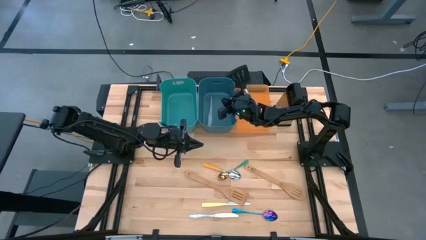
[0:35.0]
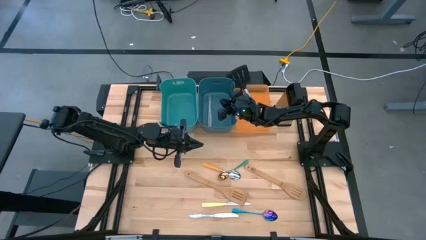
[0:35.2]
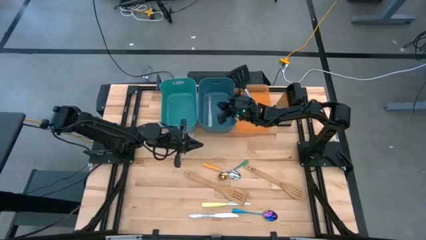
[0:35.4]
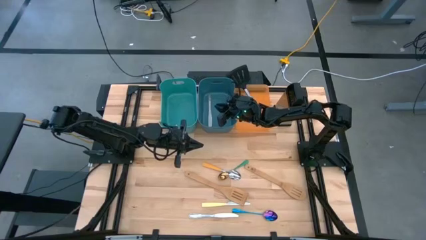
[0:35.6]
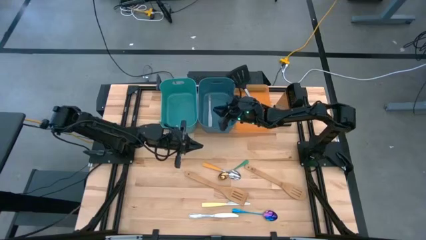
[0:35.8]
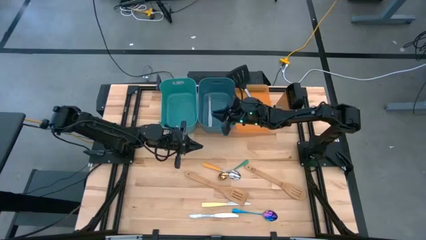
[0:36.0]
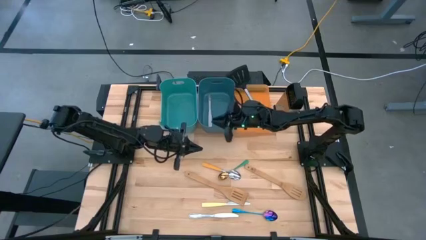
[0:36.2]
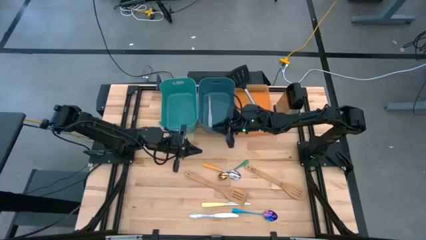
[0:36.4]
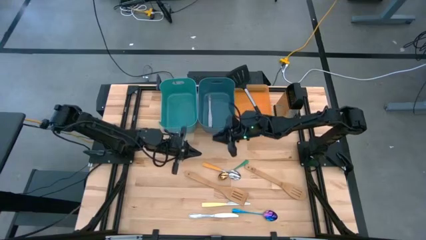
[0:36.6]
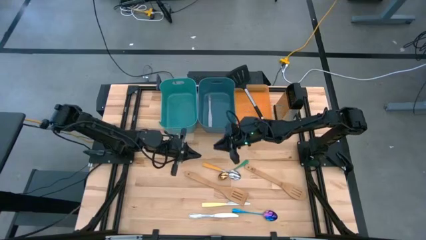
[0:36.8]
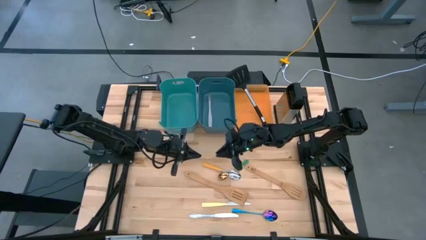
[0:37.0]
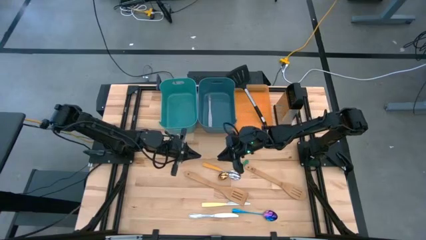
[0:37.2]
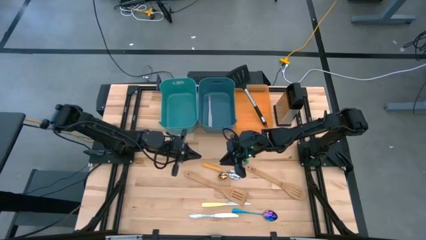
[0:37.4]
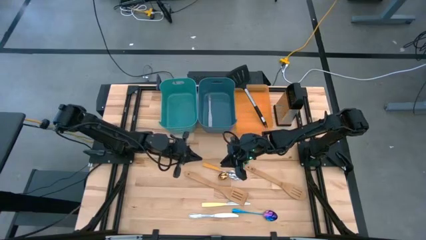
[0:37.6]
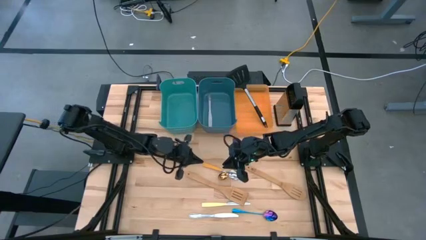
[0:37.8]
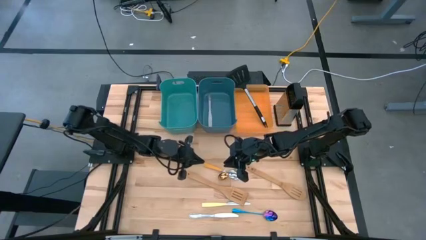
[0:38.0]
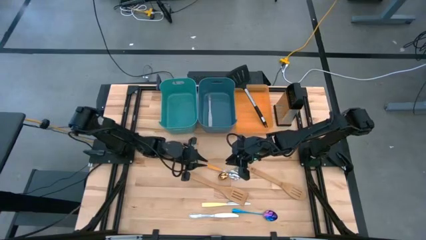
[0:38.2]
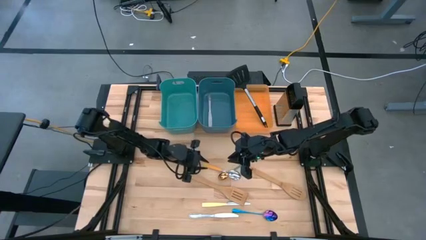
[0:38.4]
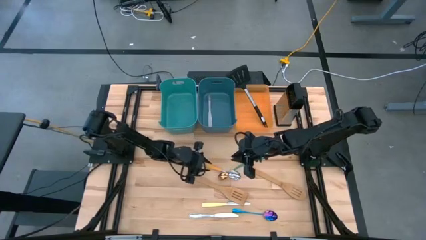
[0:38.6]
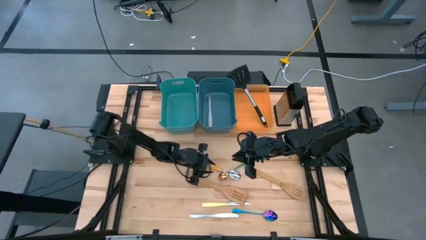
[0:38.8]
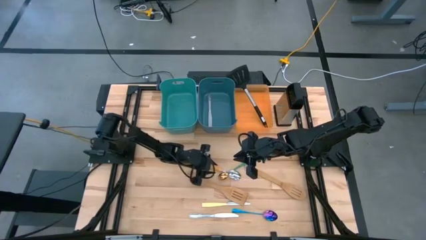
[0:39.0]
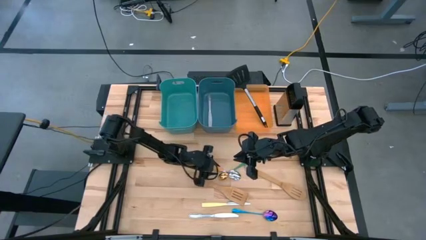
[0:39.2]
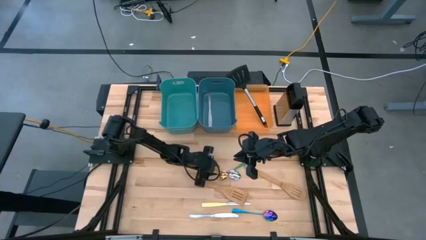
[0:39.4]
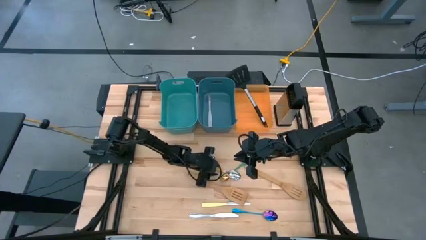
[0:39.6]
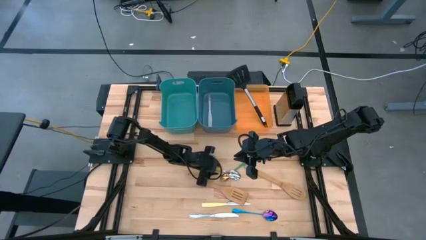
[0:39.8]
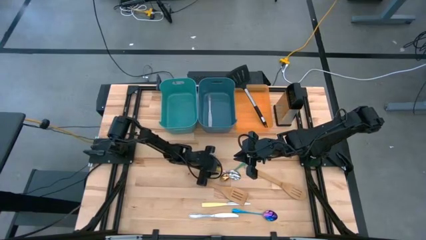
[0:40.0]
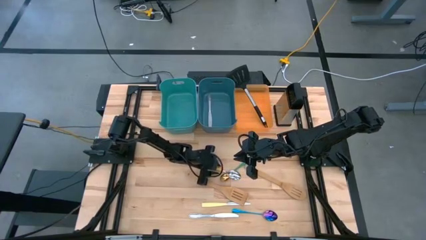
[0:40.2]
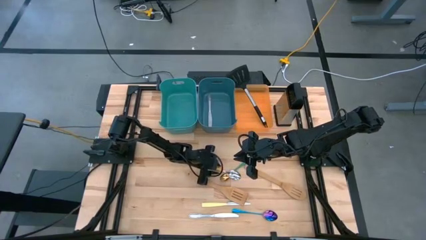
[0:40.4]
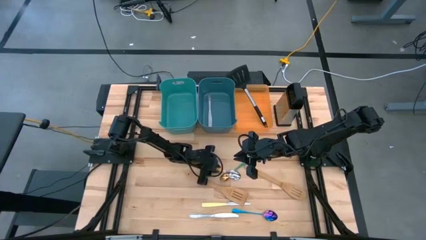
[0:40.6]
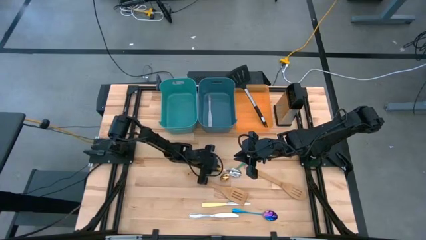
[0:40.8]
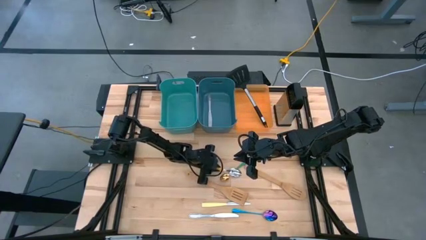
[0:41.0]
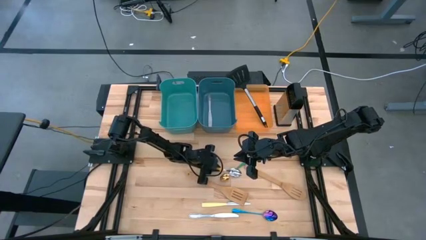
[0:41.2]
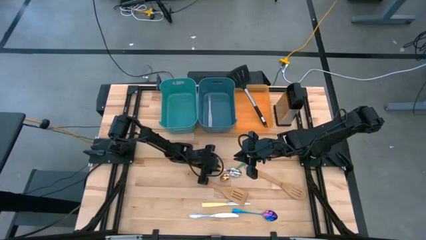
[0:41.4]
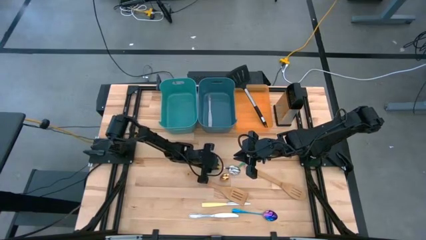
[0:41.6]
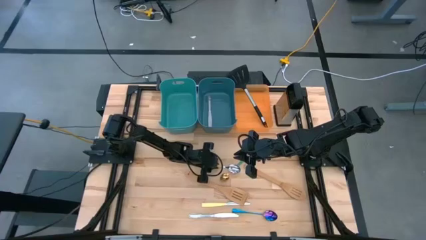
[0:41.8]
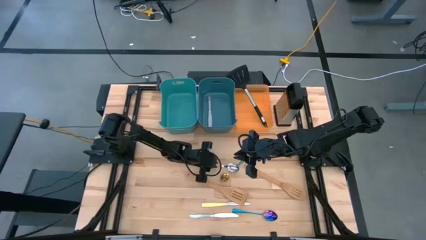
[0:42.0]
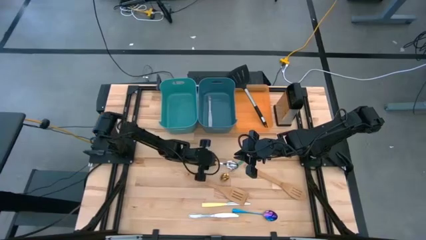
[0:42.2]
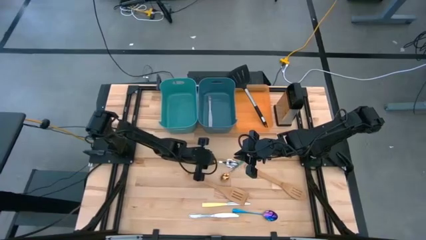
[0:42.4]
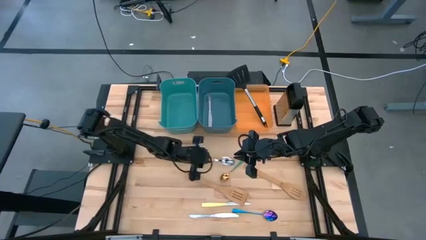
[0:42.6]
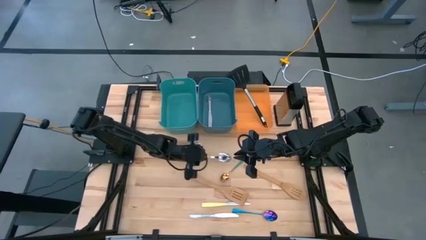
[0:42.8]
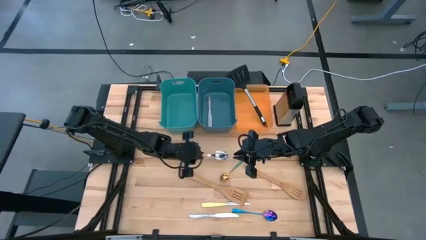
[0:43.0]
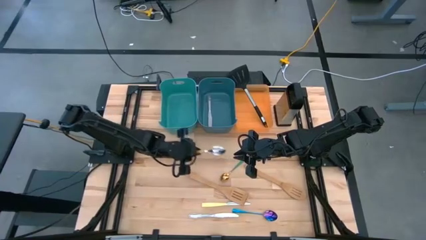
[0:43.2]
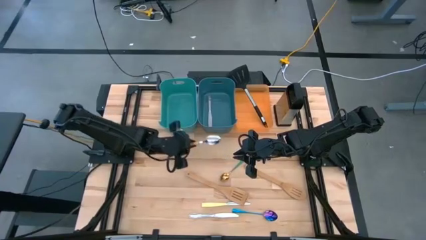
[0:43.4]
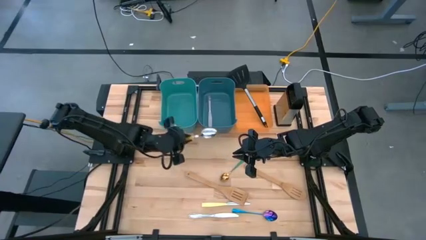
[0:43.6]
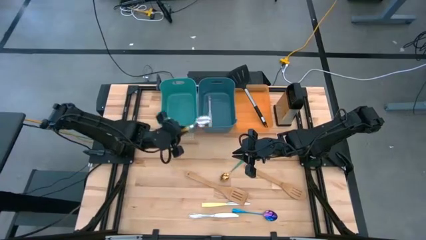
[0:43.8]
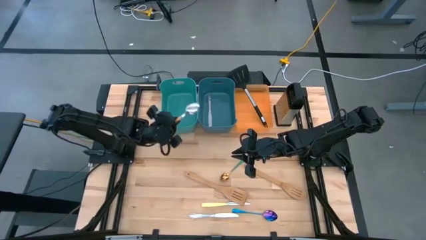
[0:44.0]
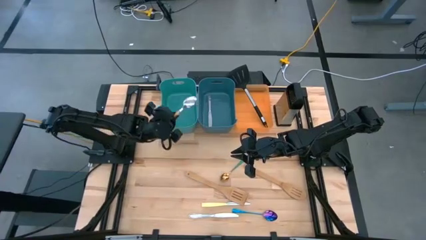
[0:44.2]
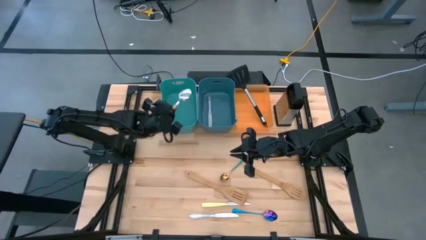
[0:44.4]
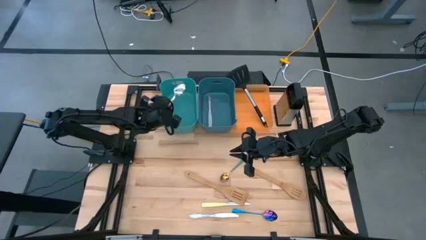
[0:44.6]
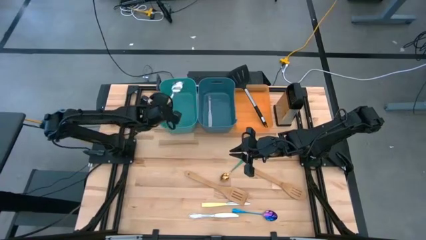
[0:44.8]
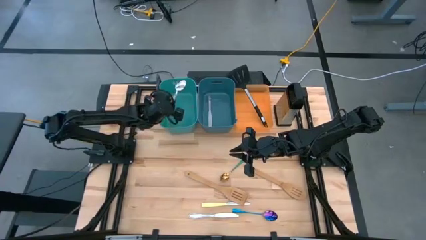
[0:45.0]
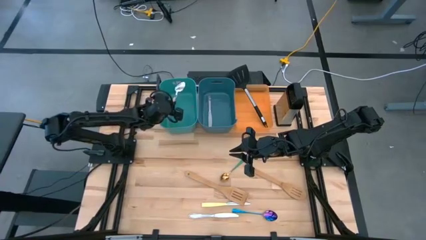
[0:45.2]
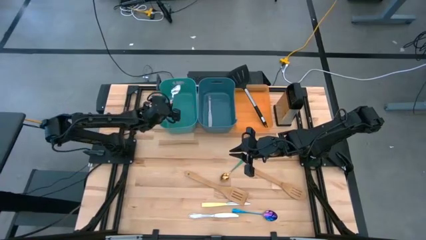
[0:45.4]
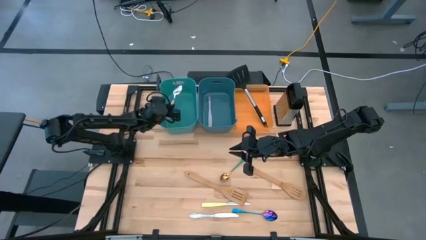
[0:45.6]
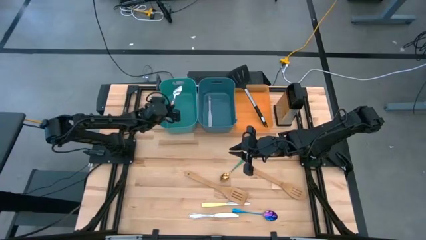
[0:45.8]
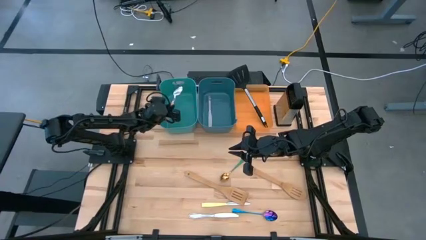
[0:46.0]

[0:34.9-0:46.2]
Task: Pick & Place Kitchen Items
Put the yellow spoon into the green bin

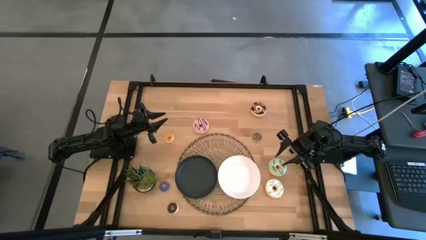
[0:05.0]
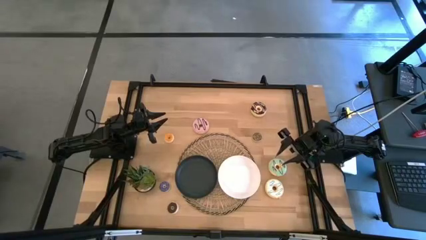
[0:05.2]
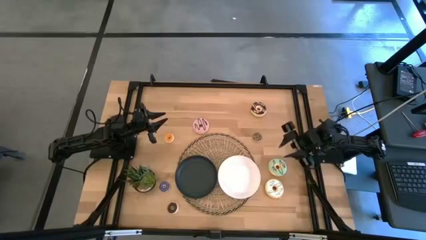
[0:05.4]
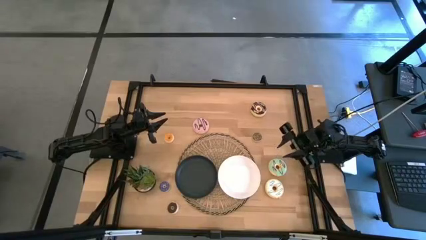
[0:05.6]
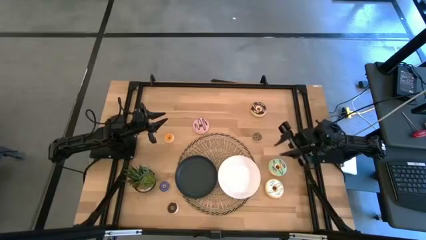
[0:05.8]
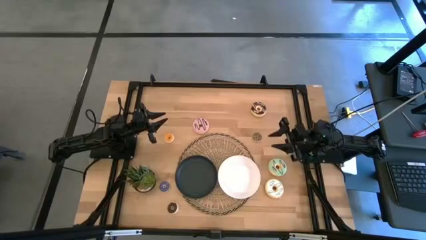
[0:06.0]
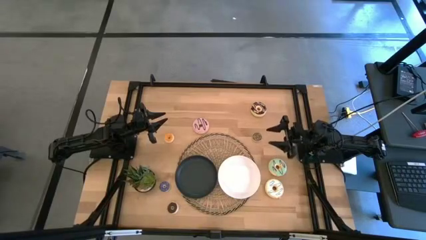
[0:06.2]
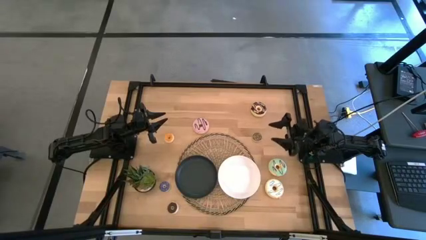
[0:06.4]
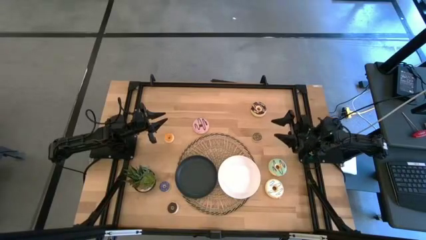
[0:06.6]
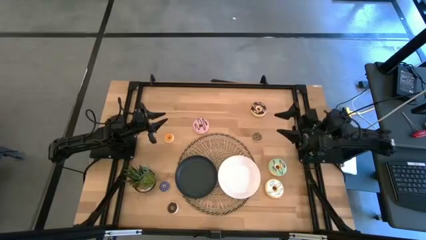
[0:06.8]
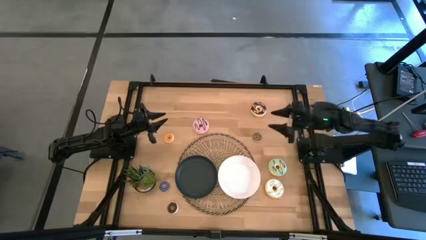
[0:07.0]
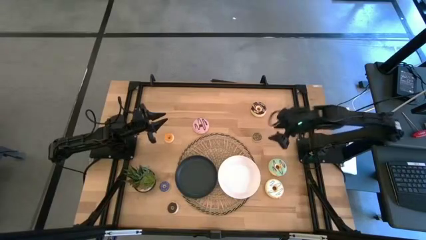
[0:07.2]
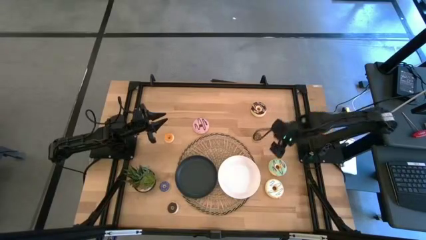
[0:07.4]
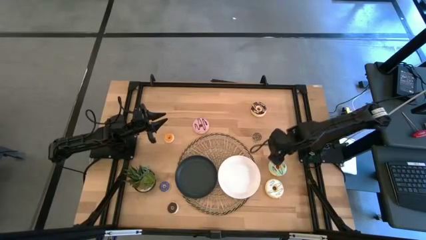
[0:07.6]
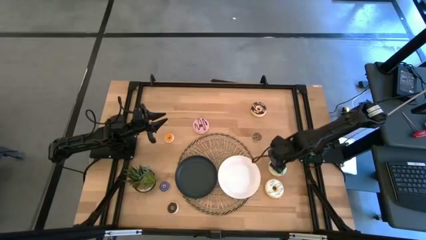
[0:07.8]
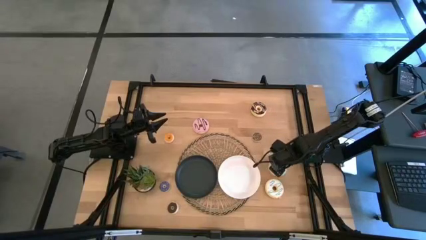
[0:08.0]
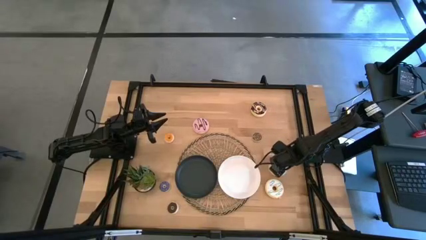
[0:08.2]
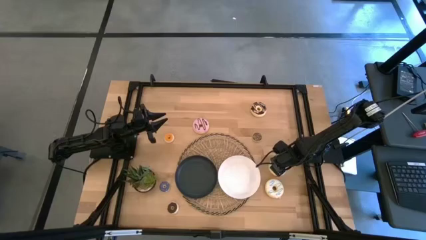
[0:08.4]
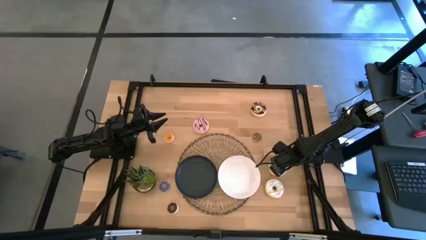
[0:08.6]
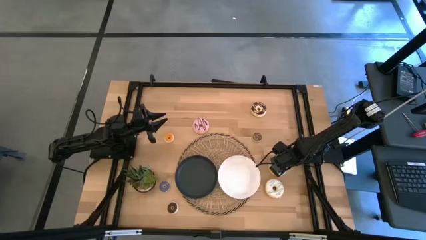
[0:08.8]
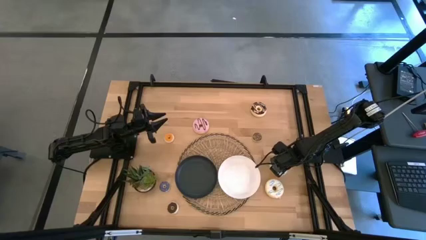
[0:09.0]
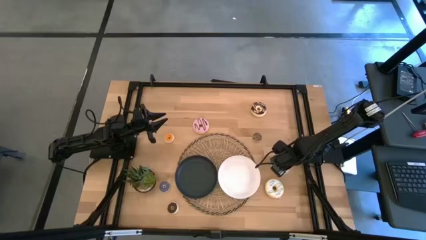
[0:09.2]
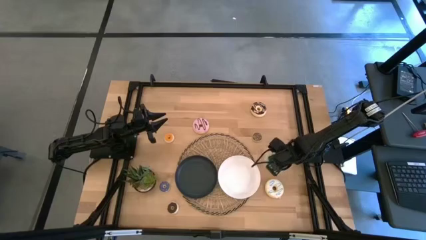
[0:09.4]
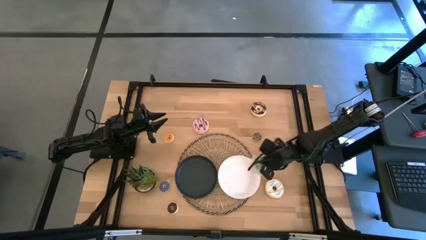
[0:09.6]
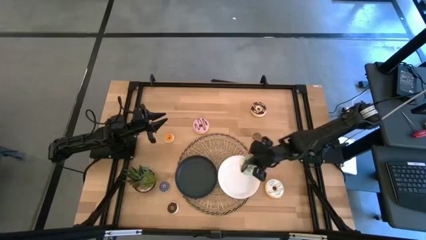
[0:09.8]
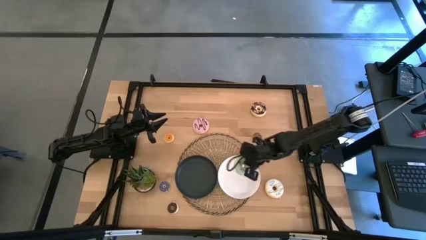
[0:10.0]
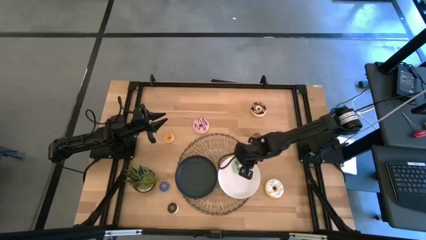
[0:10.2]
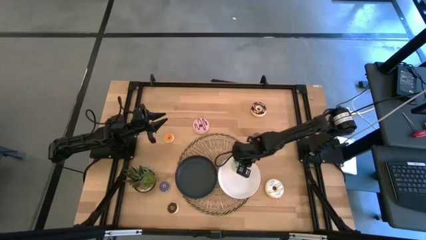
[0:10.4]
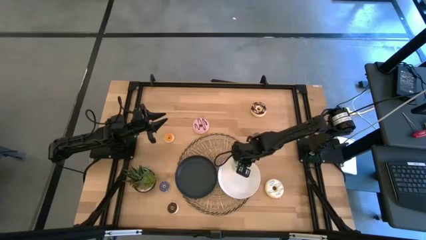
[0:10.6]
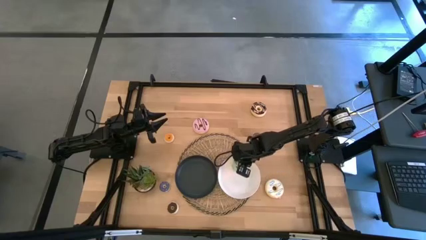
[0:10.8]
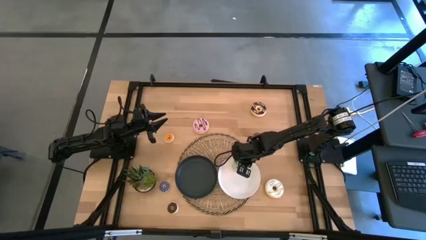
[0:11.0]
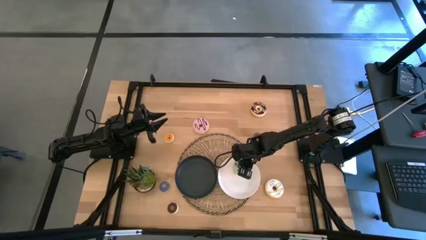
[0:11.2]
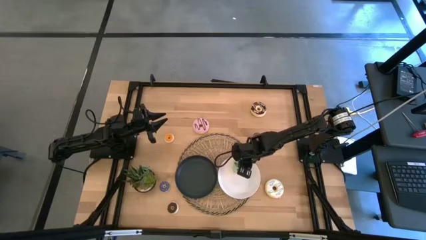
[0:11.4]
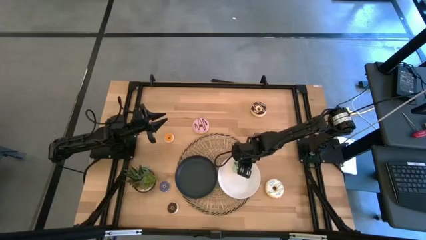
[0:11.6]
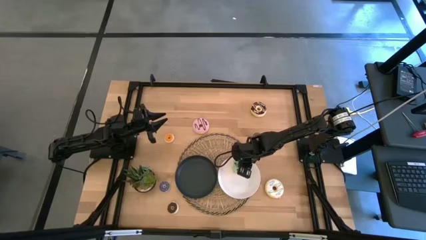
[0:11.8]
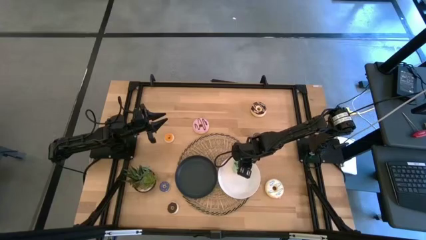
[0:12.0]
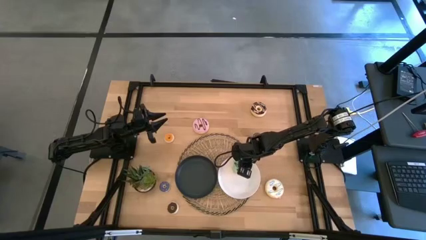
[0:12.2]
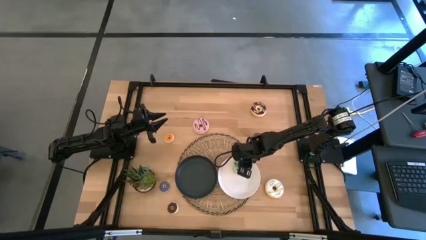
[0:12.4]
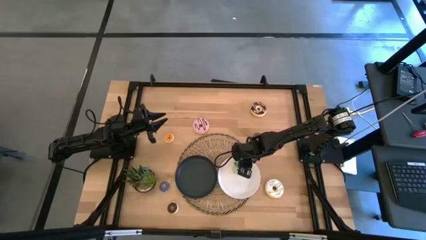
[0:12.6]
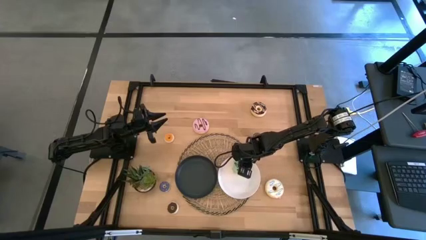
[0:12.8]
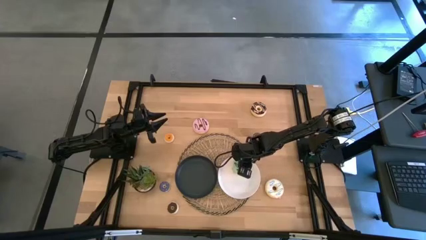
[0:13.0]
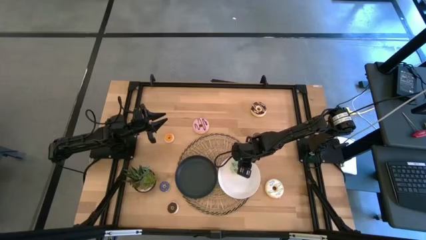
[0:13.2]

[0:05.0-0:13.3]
Task: Pick & Place donuts
Put the large light blue donut on the white plate
